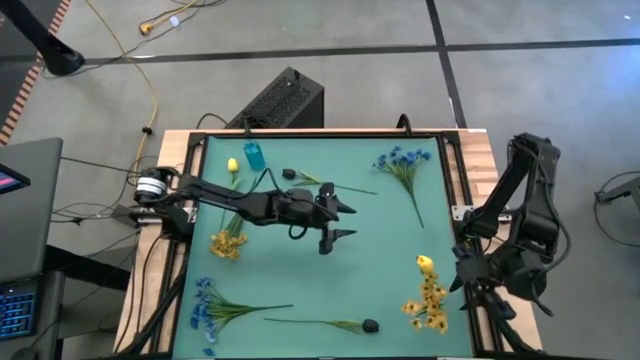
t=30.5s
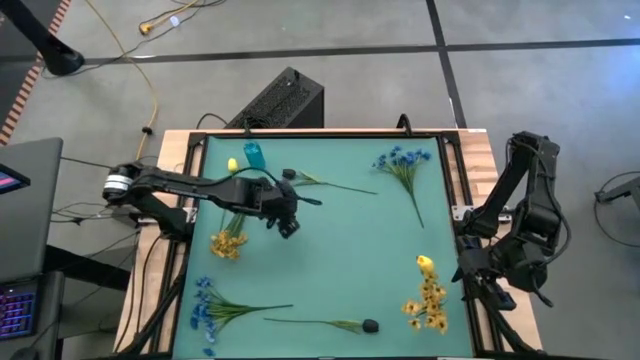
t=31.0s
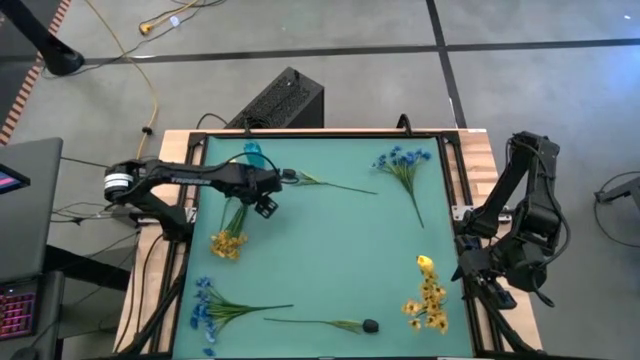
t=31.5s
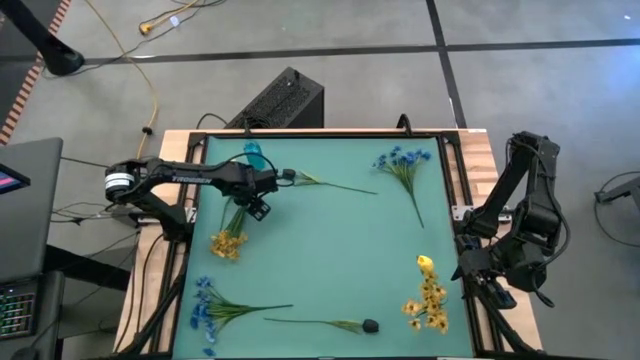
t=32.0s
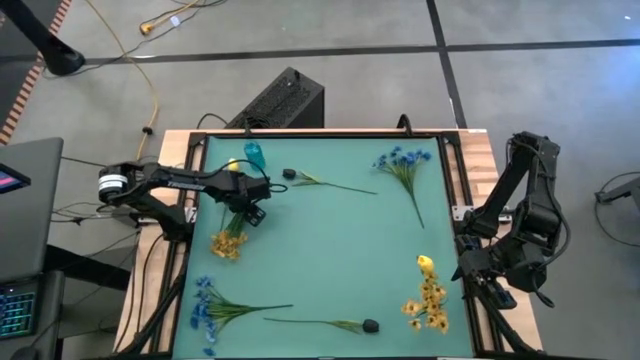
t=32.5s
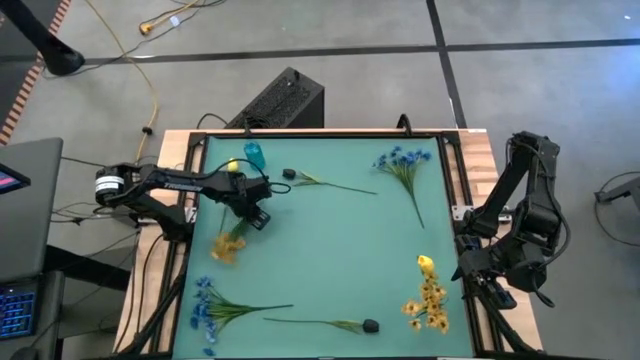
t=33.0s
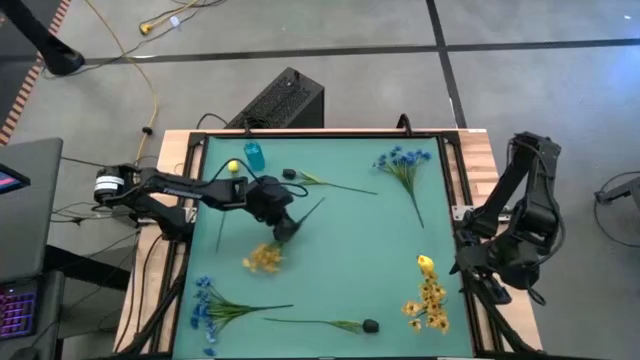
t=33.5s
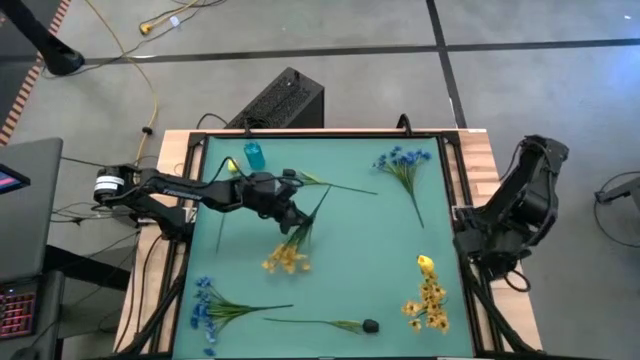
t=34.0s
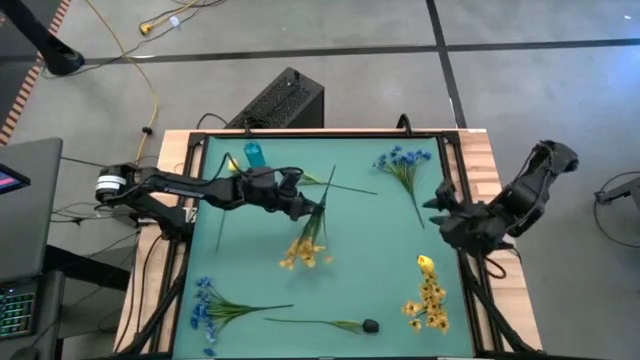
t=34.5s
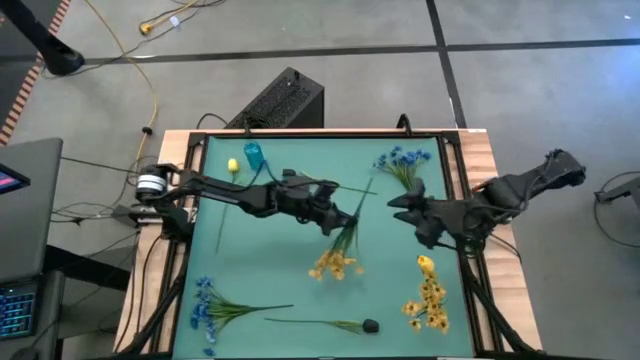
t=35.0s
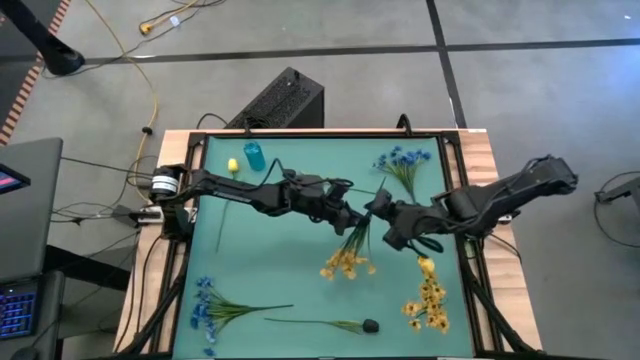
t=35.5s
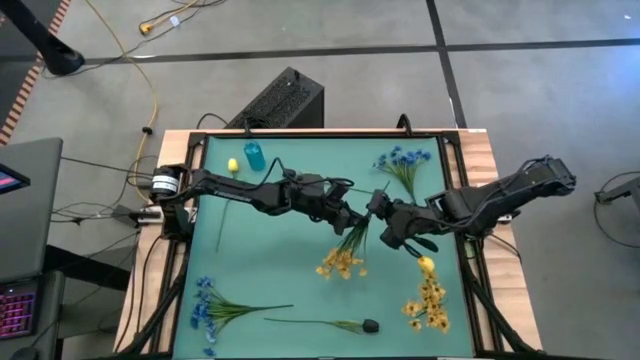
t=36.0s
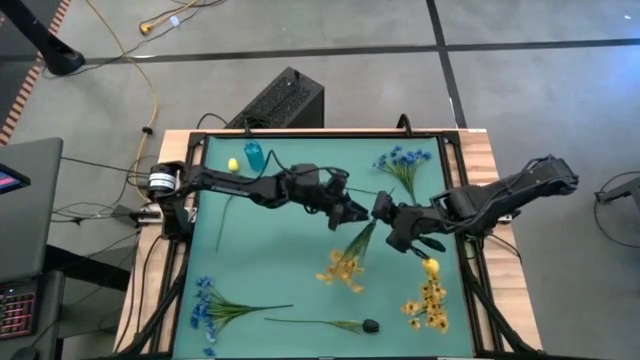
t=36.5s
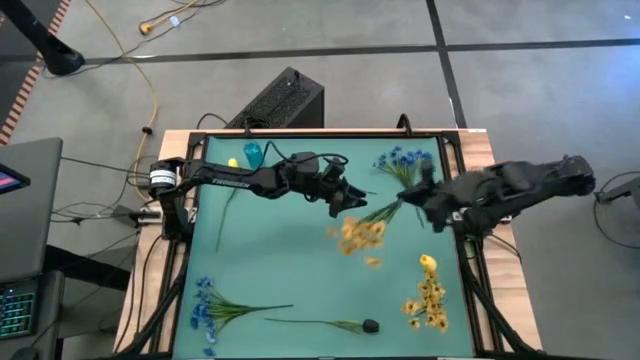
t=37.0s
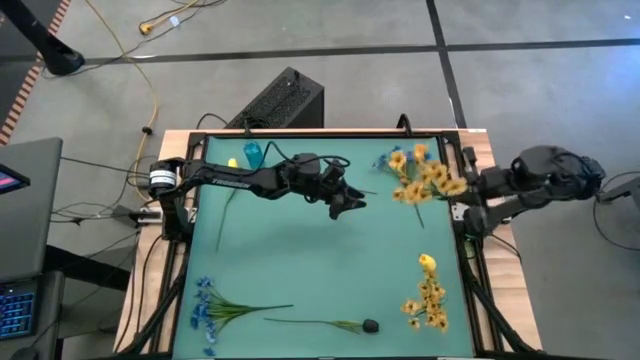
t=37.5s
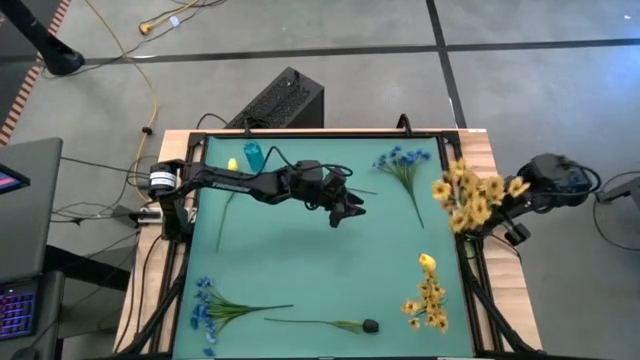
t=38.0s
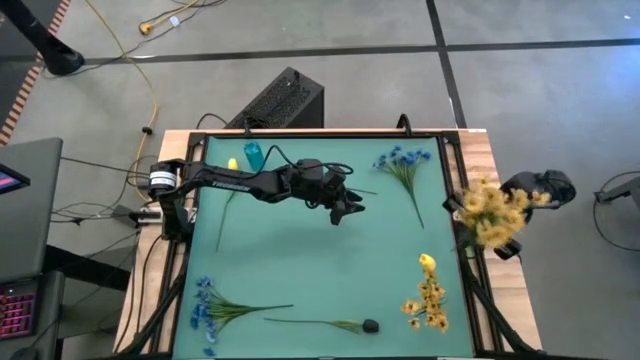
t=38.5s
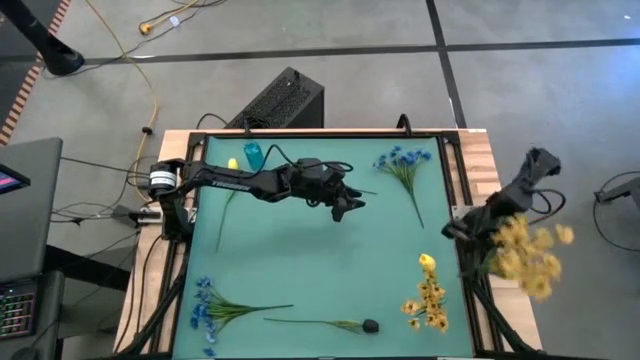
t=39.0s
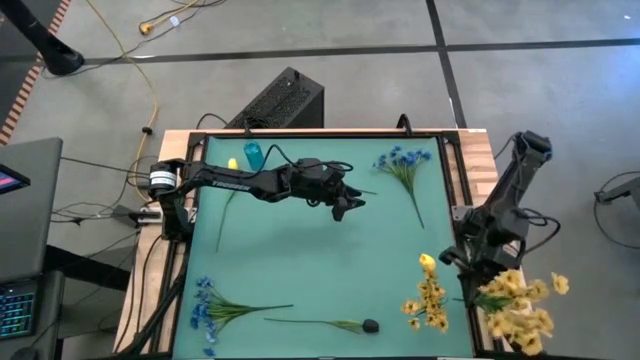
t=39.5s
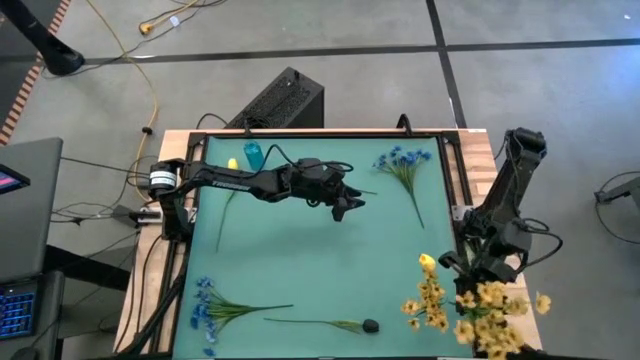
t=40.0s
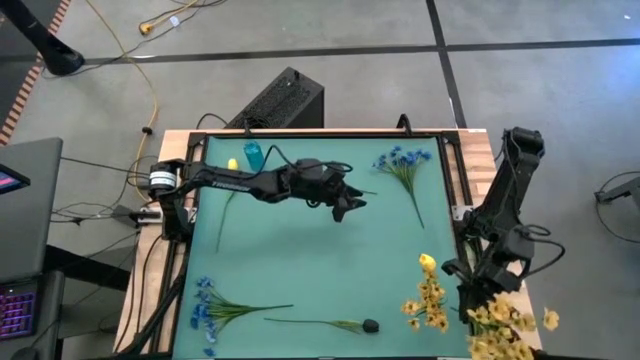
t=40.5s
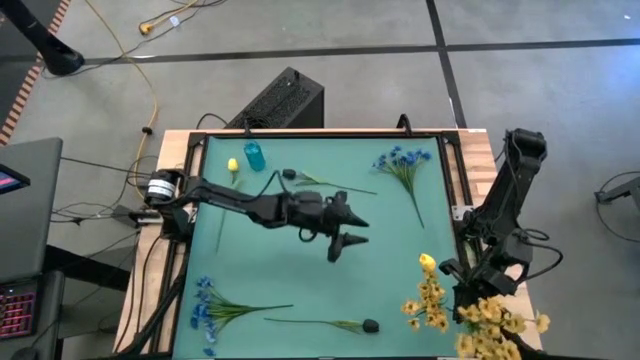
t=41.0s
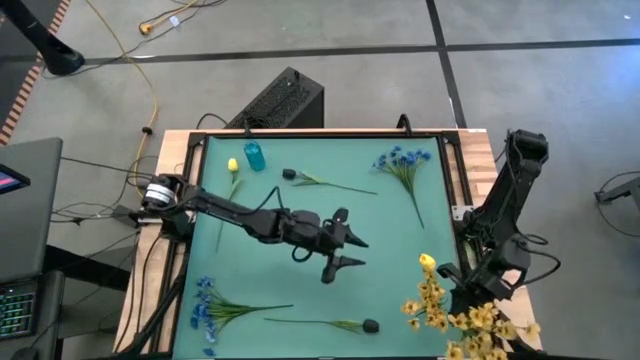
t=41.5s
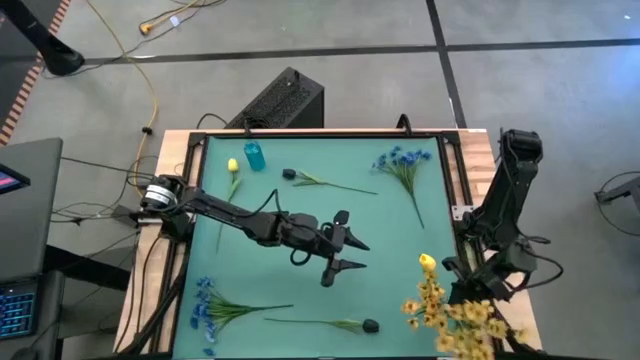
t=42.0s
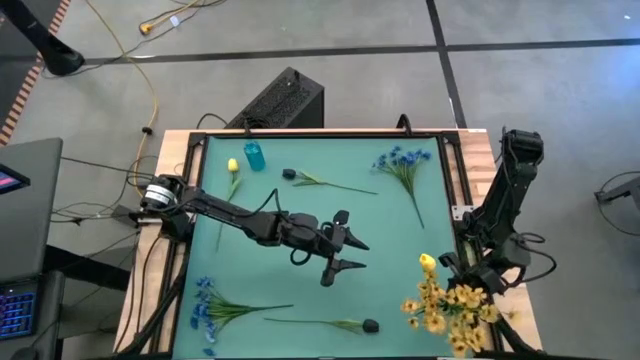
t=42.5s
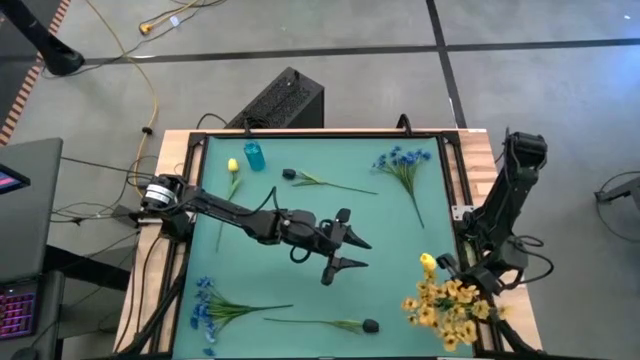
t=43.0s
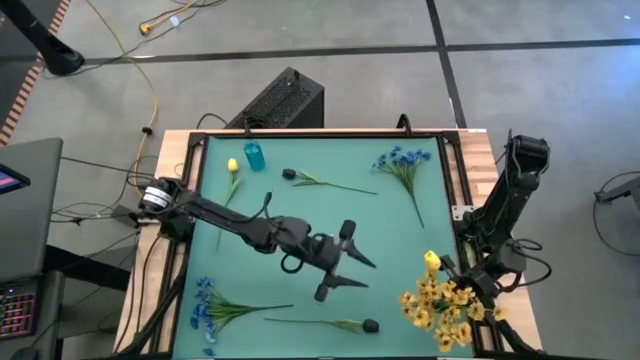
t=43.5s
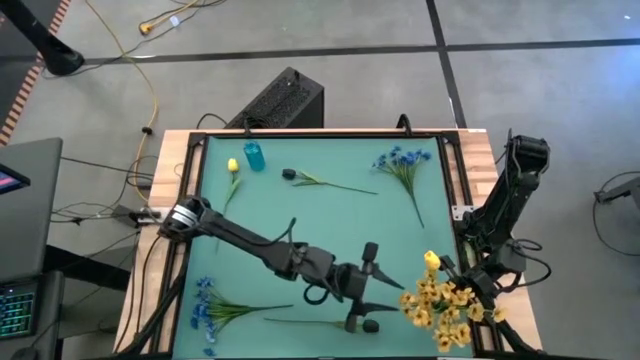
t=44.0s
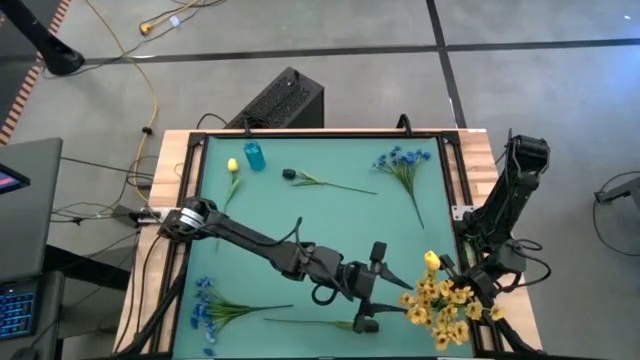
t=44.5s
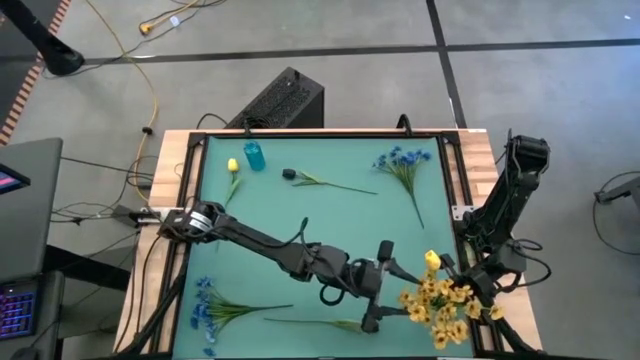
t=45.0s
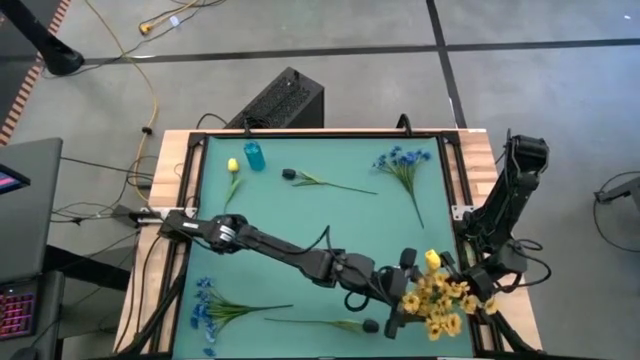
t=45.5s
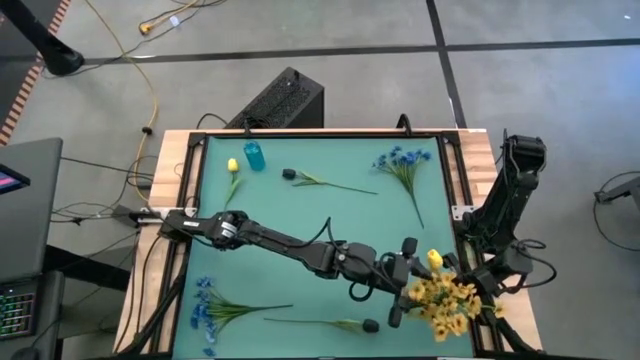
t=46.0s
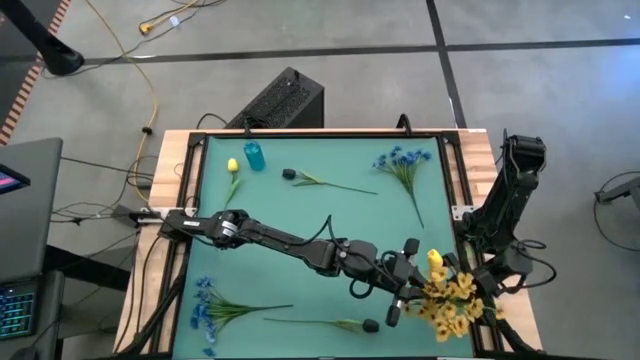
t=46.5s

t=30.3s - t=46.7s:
Task: Sort flowers into vase by color
Put the yellow flower into the transparent vase

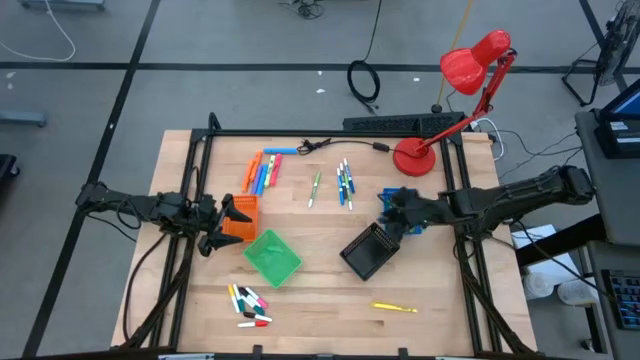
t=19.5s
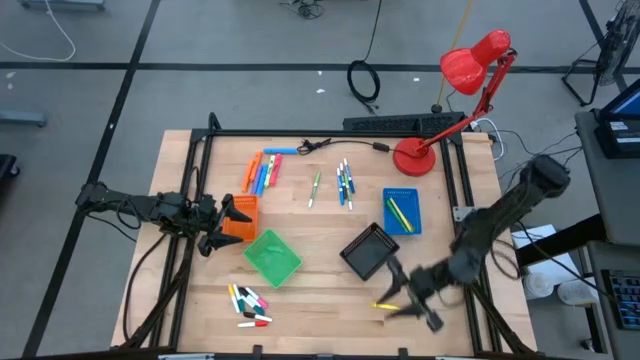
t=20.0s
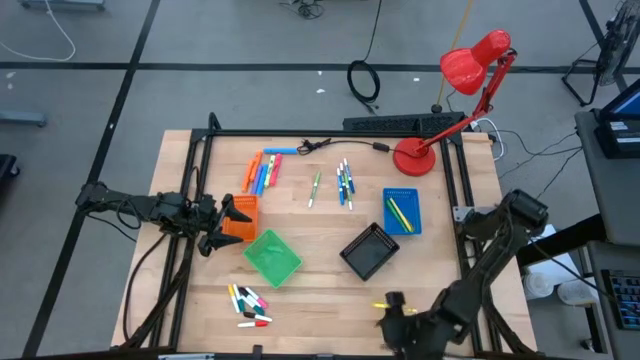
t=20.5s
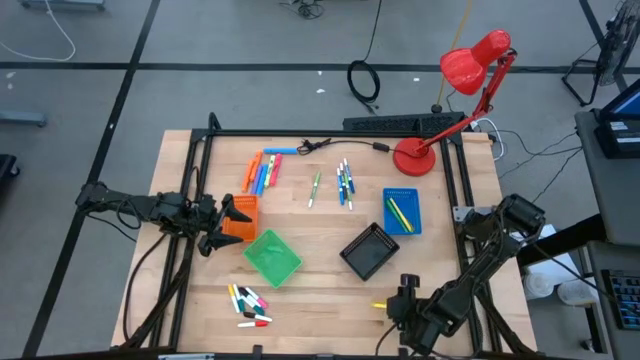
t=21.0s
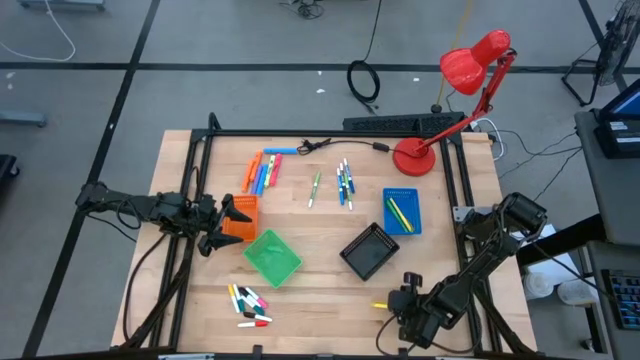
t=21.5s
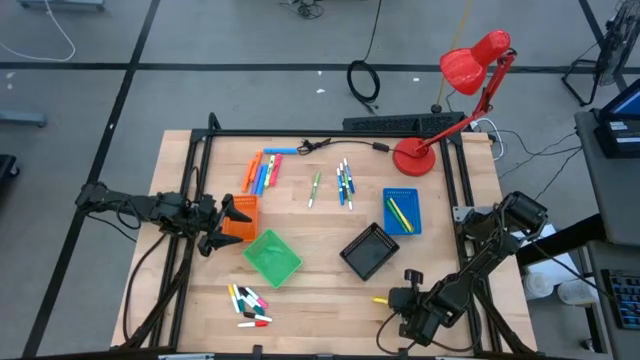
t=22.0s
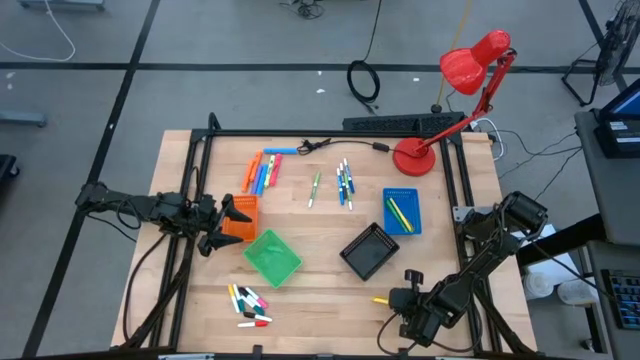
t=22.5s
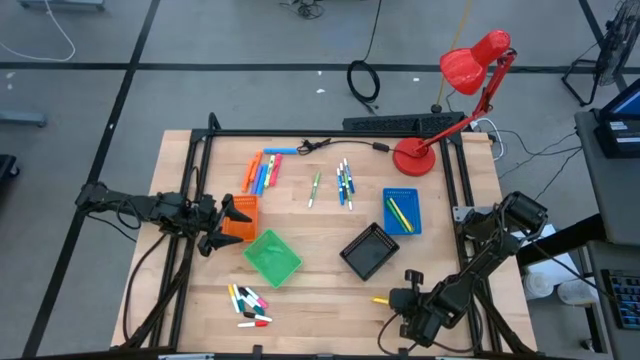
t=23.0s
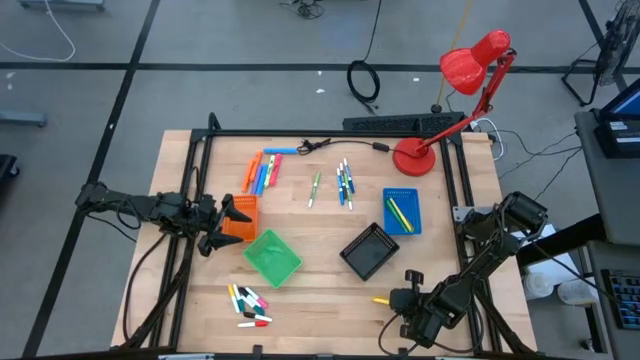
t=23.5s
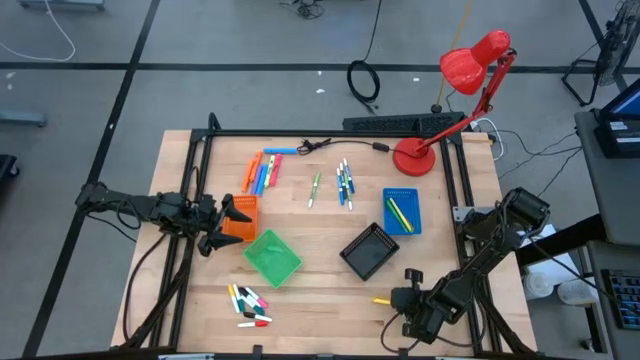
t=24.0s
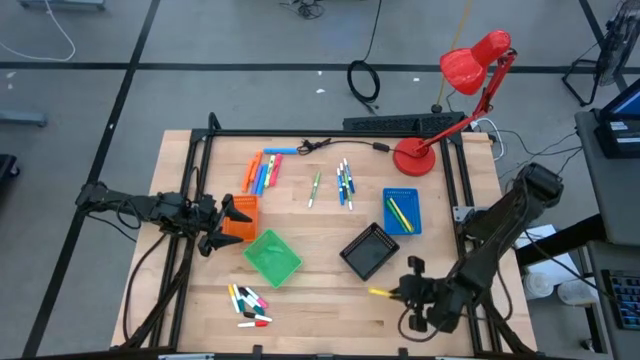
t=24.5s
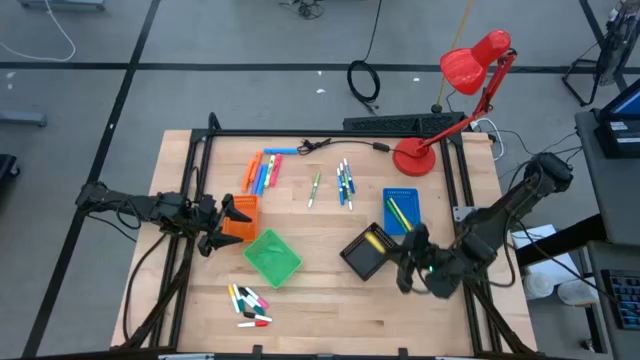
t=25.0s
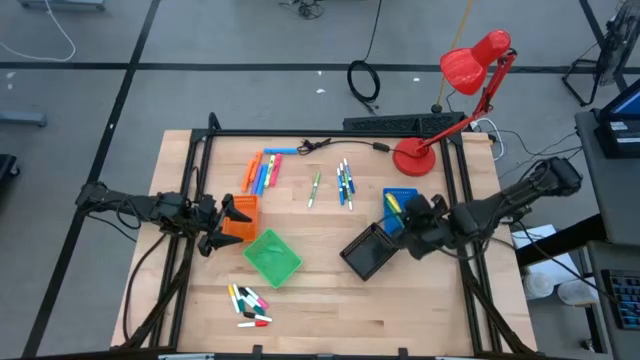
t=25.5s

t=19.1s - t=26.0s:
Task: Pick & Place Markers
Put the yellow pen into the blue basket
